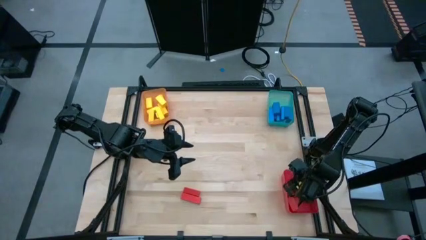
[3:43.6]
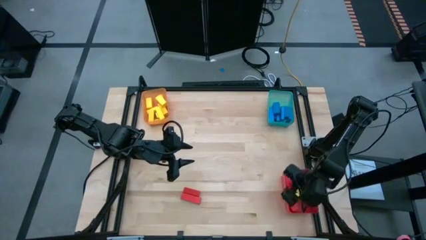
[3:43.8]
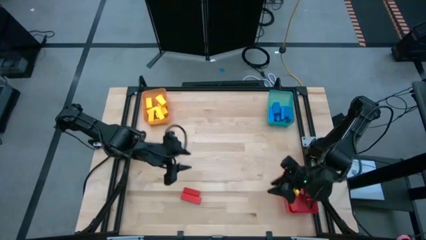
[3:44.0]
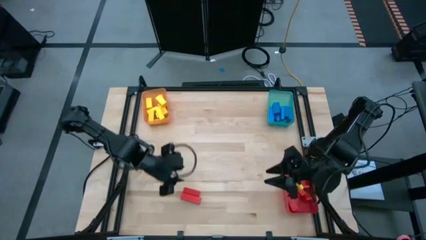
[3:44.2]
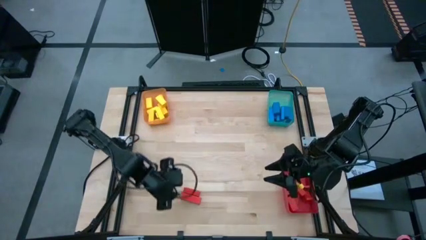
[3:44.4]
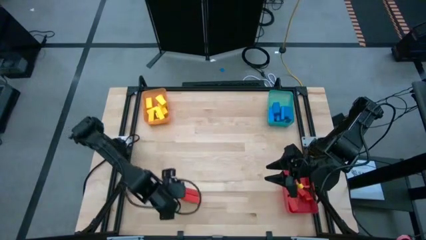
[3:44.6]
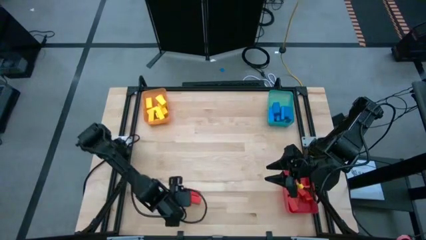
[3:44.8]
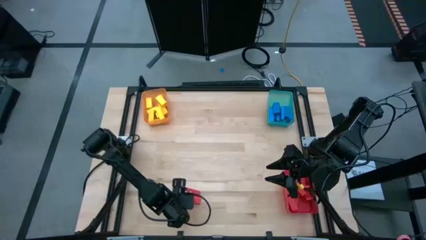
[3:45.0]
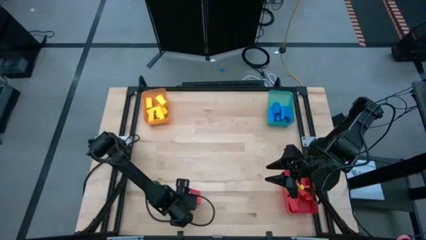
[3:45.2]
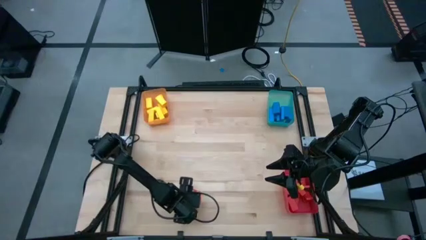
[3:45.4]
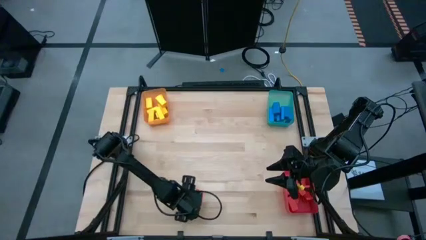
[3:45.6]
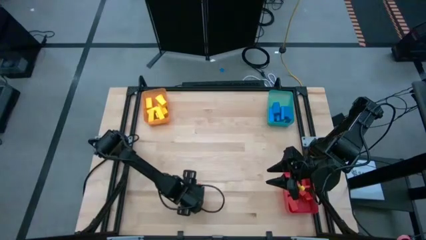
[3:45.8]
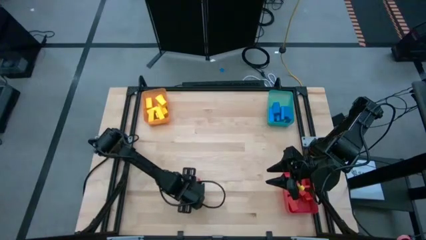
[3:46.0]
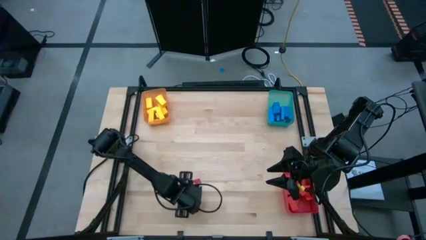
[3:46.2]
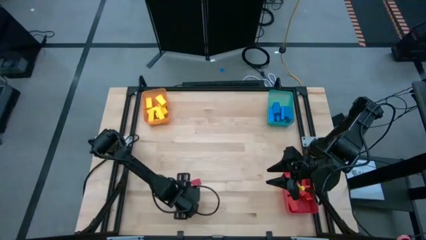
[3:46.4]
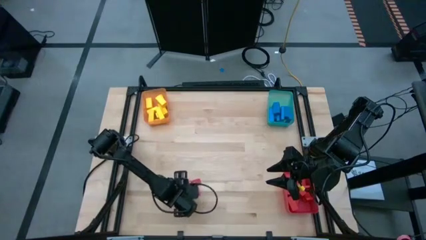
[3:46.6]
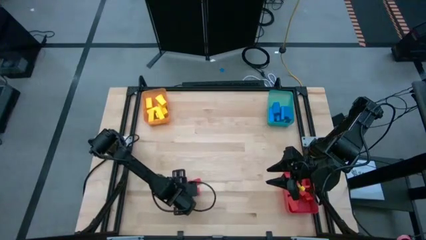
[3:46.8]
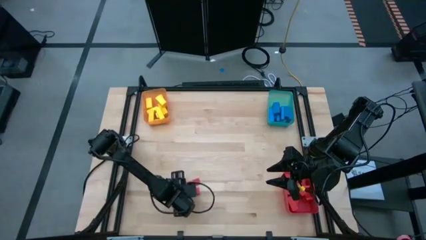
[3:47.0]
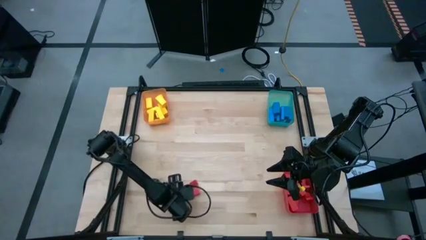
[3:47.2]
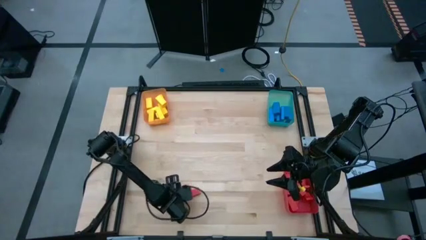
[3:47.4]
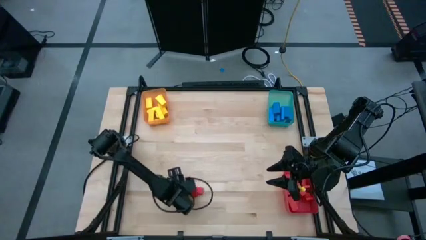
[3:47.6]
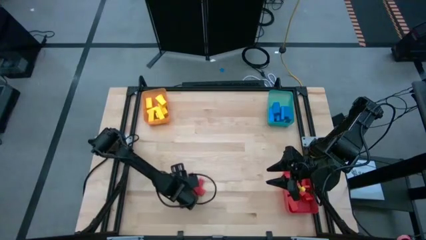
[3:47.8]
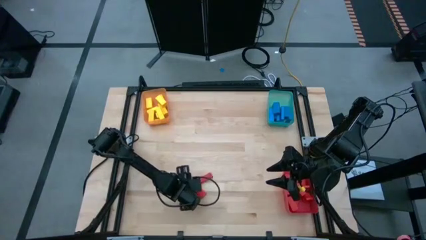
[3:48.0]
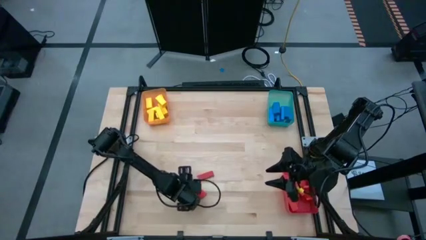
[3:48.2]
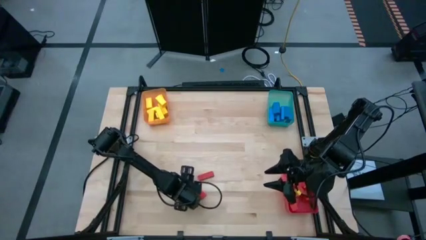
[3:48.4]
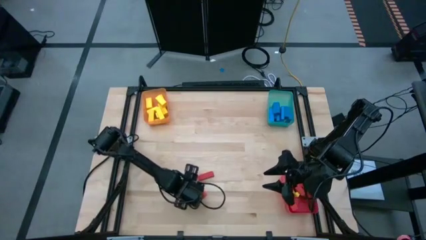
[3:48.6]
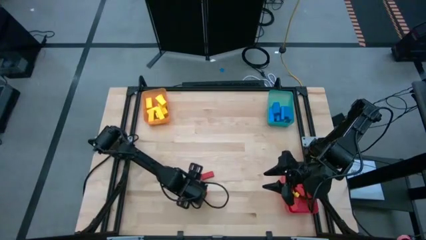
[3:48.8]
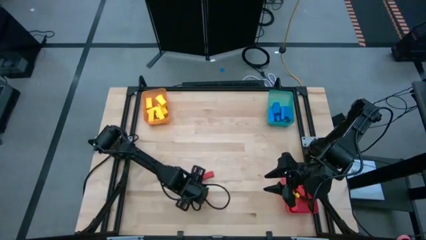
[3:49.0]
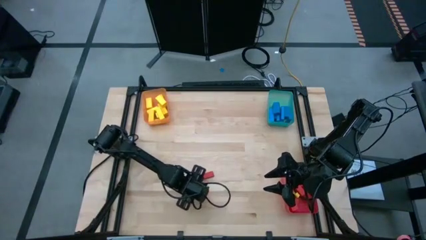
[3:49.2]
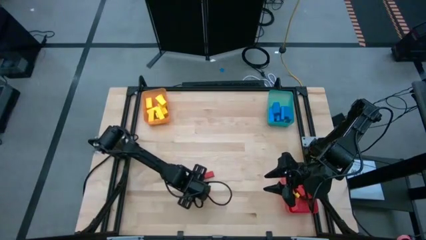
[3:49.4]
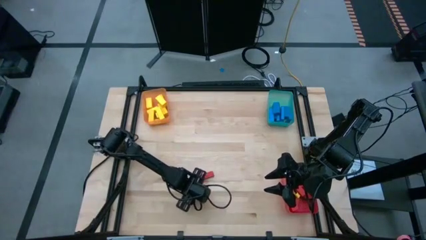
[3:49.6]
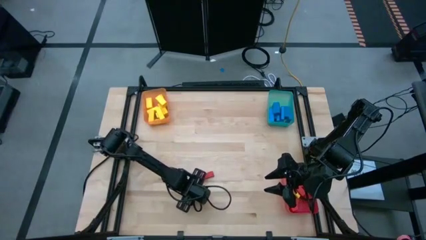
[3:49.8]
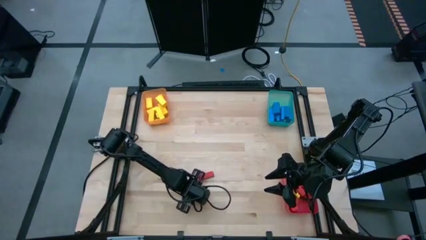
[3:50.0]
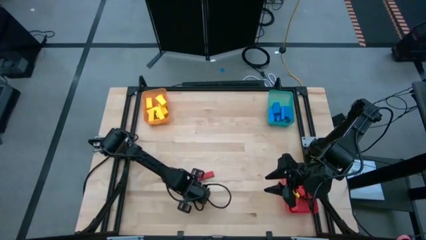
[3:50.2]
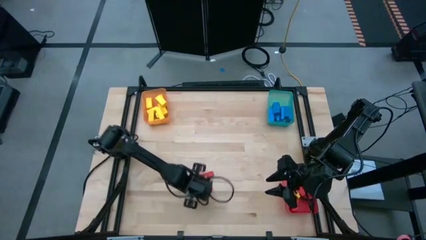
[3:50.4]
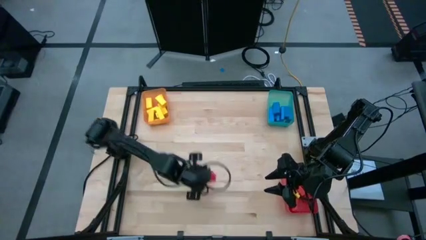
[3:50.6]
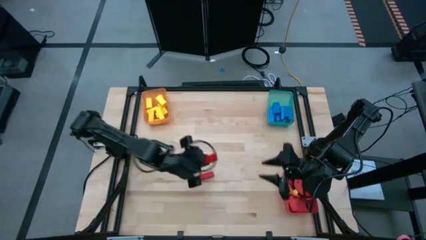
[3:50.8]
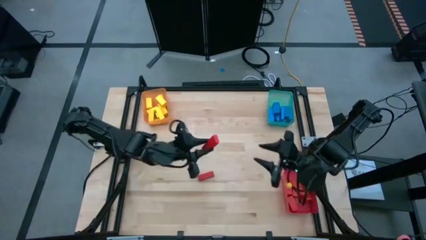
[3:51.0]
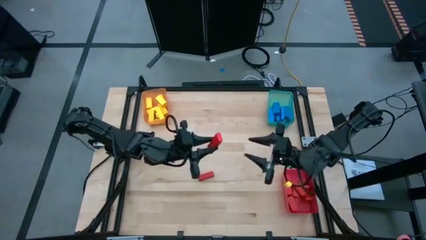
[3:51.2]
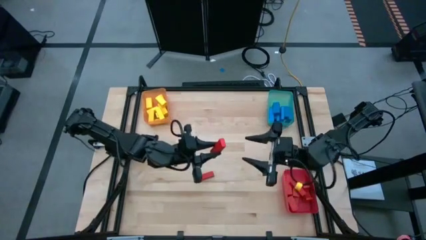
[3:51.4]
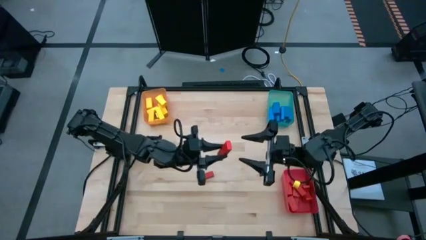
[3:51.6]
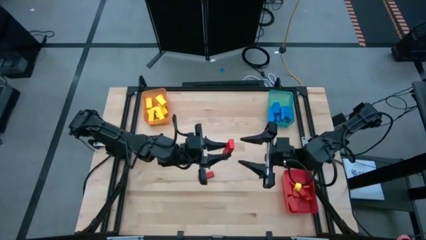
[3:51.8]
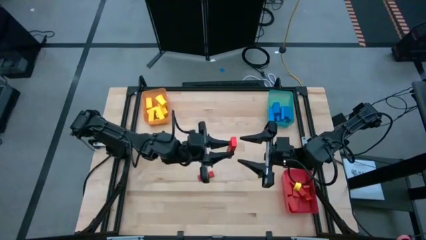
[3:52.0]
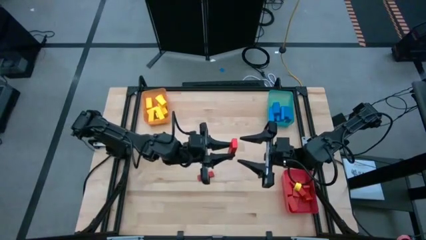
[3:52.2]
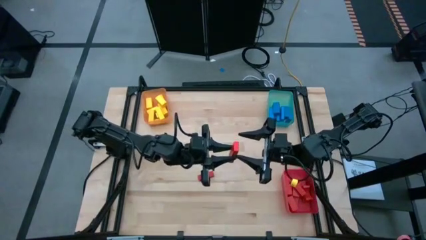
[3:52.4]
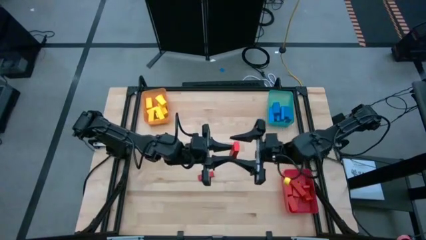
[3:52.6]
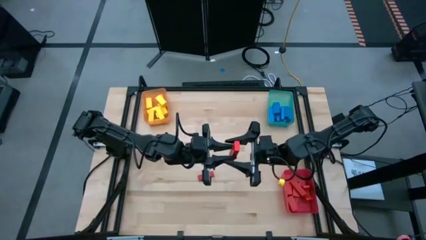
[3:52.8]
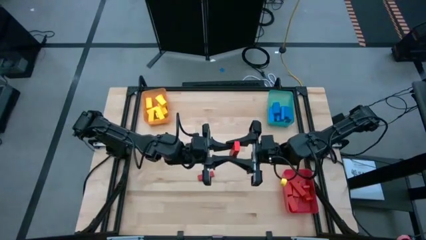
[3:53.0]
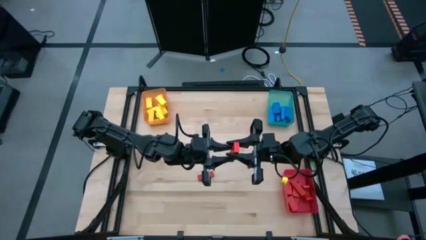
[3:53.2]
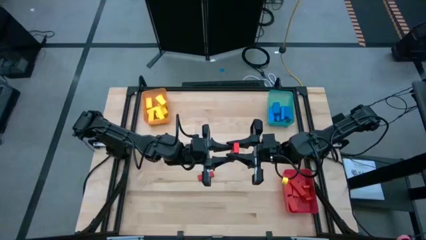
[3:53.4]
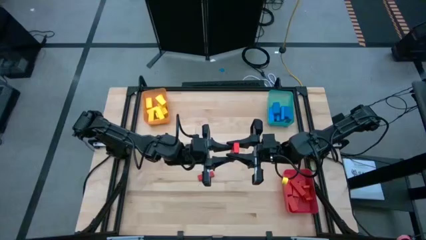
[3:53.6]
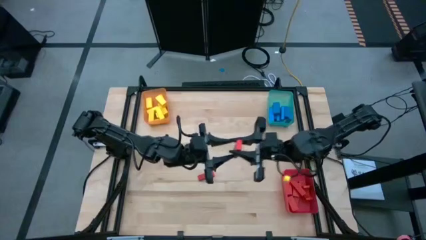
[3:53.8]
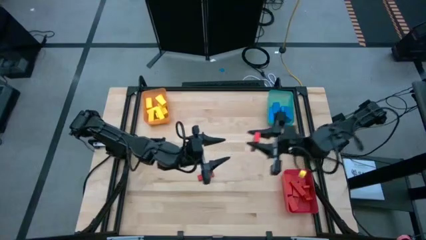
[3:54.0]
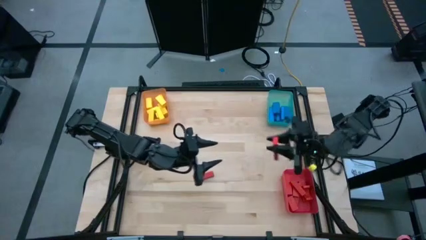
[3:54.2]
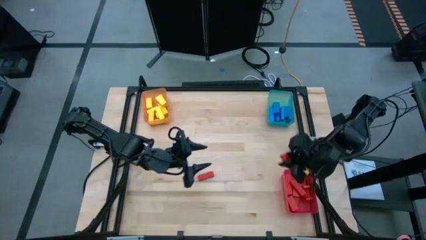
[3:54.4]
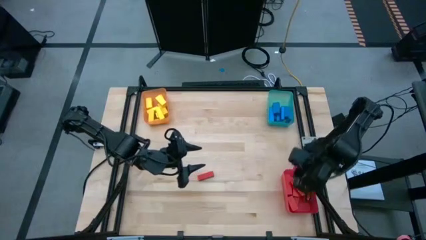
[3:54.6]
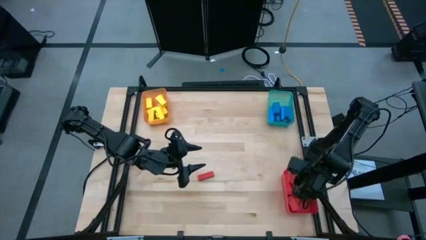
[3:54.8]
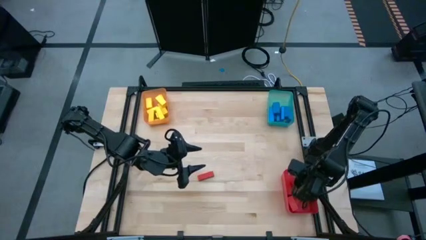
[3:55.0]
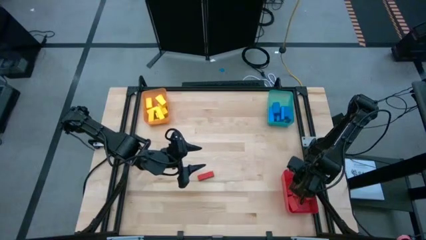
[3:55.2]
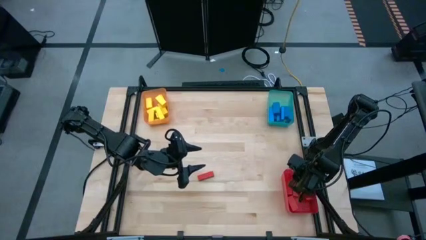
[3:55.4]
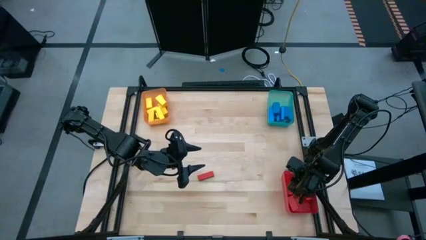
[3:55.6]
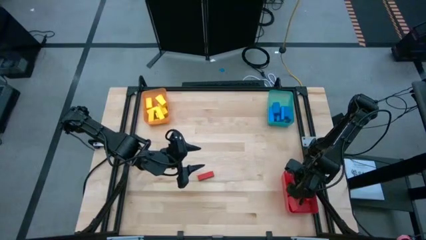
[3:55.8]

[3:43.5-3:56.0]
Task: Sort blocks
Put the red block into the red bin
